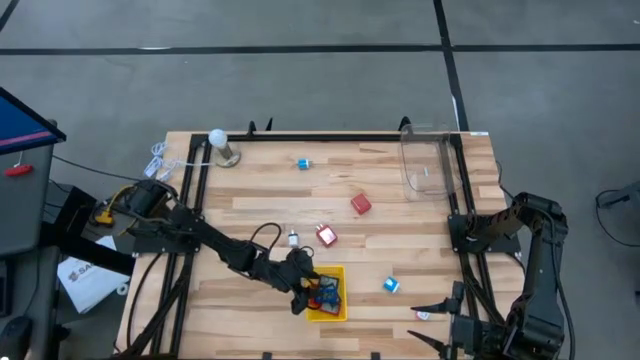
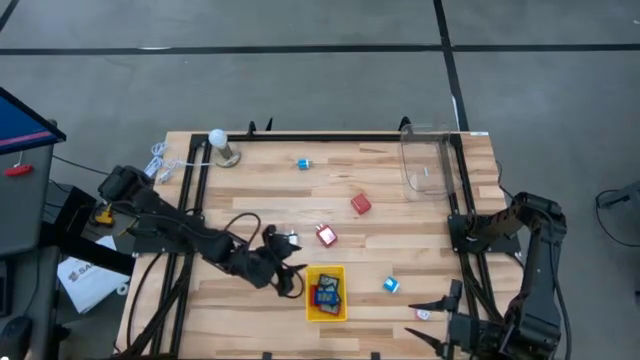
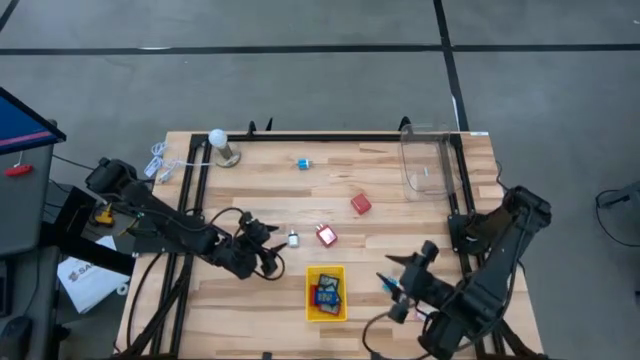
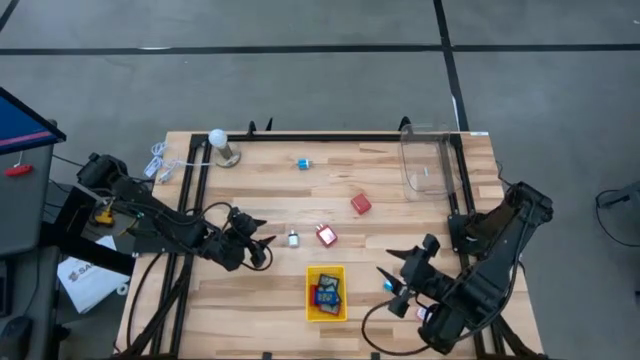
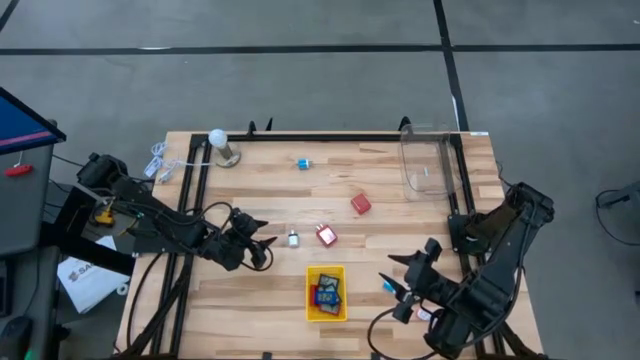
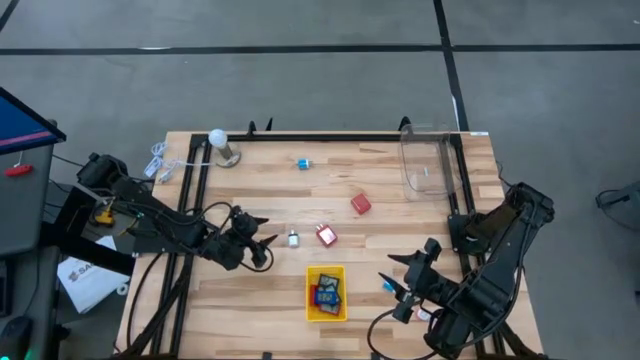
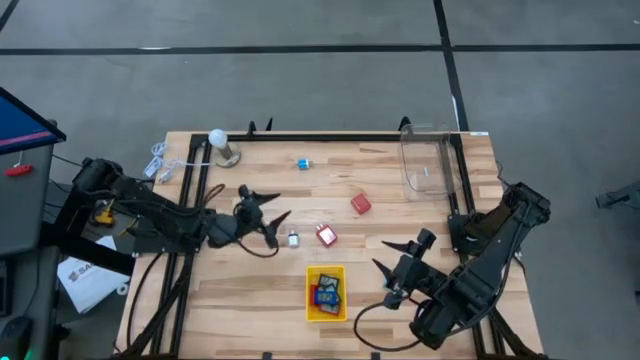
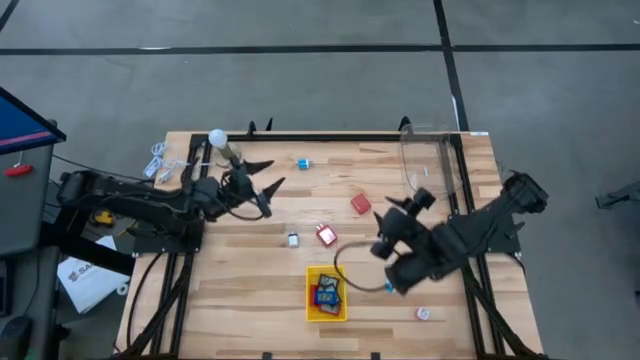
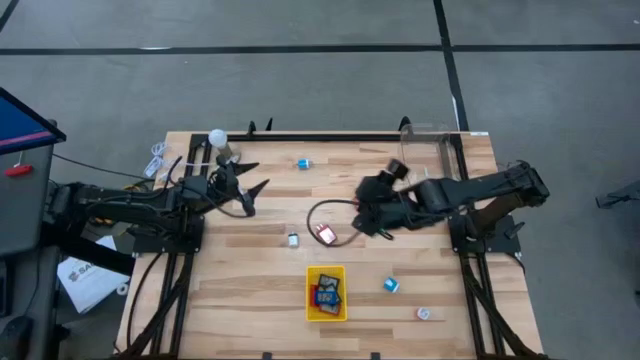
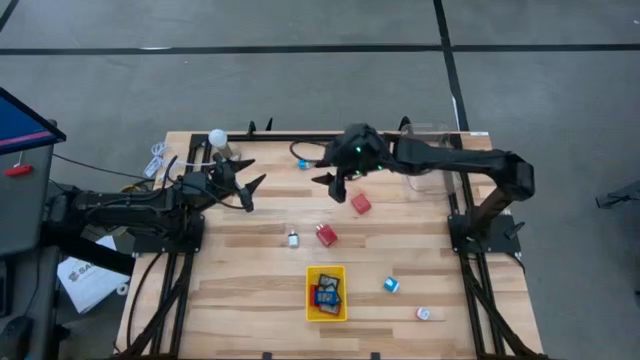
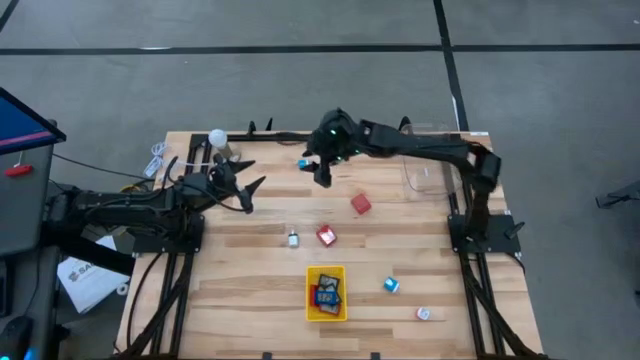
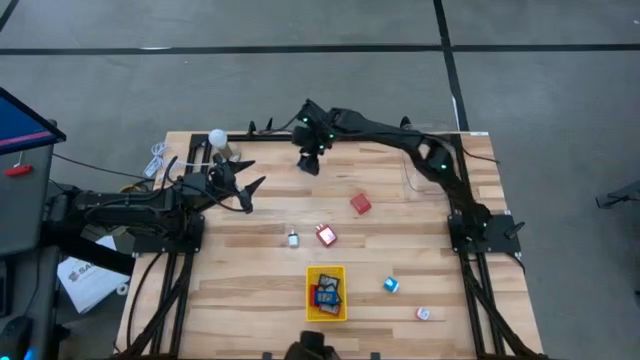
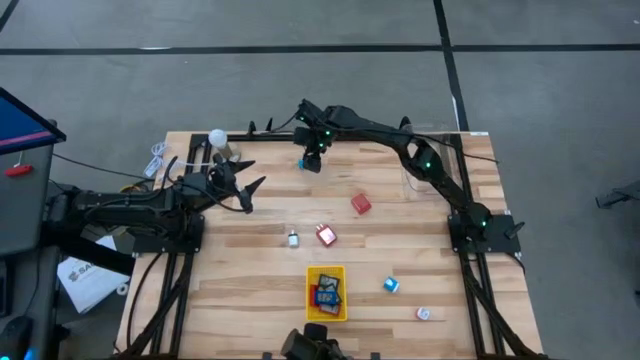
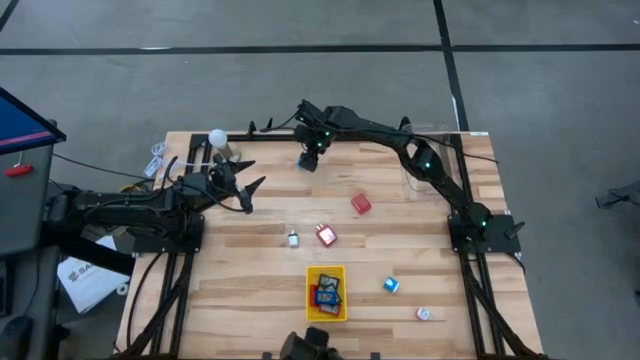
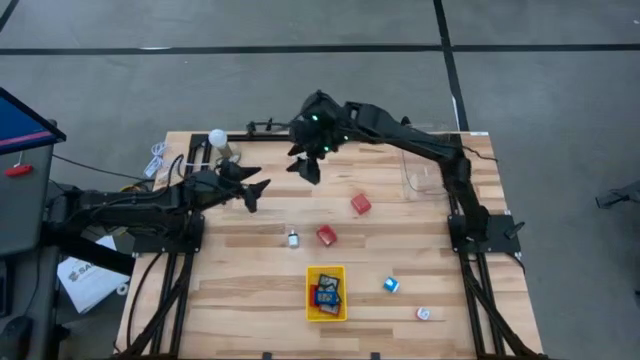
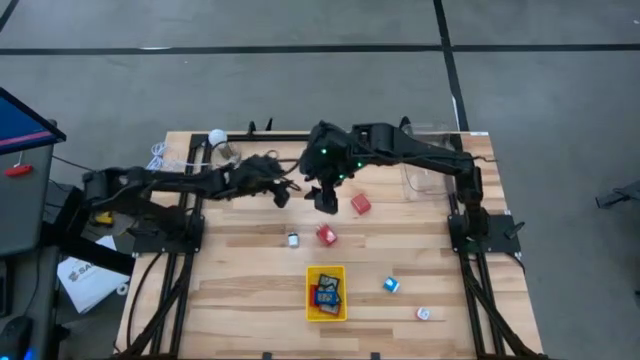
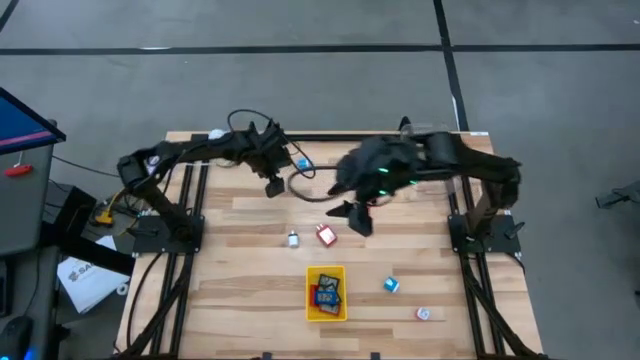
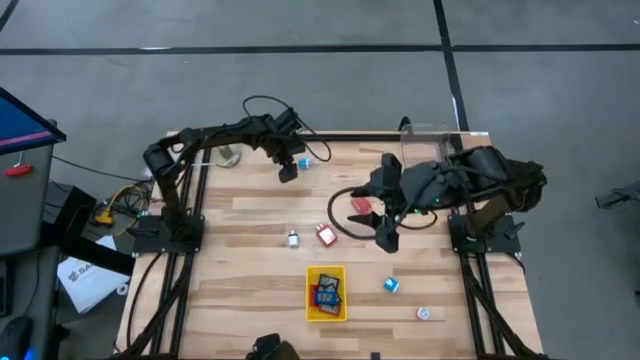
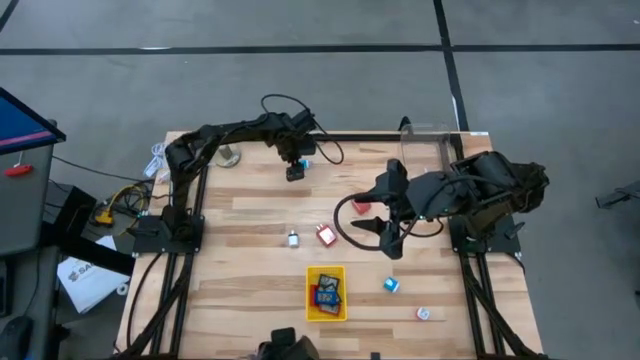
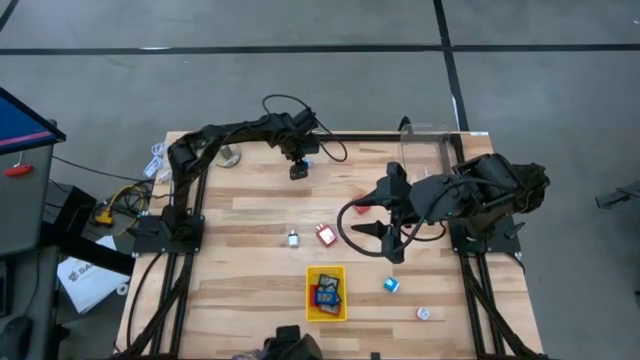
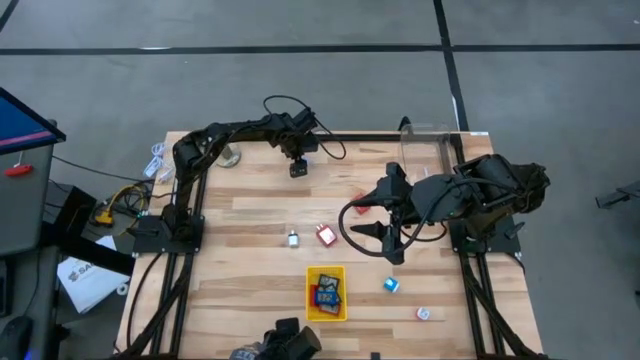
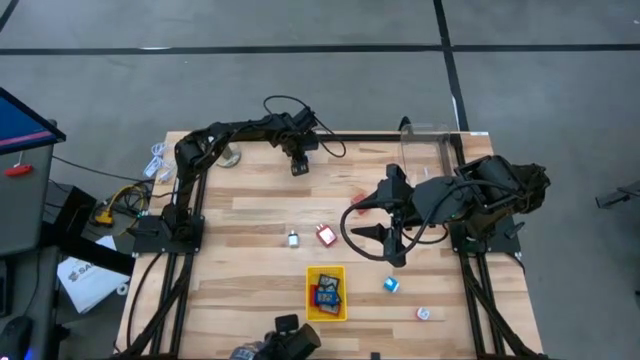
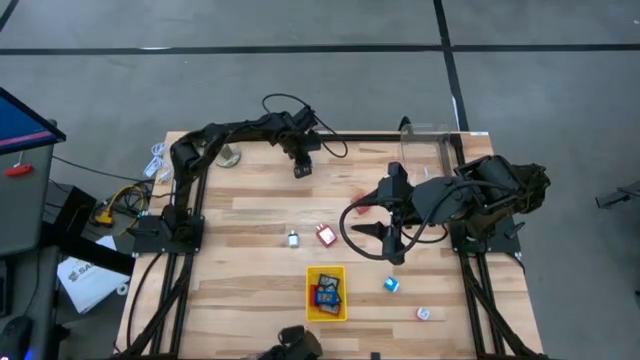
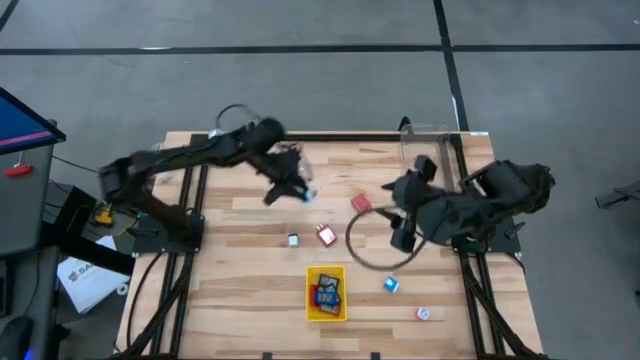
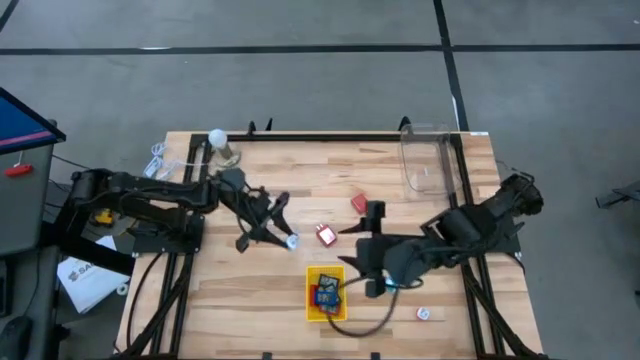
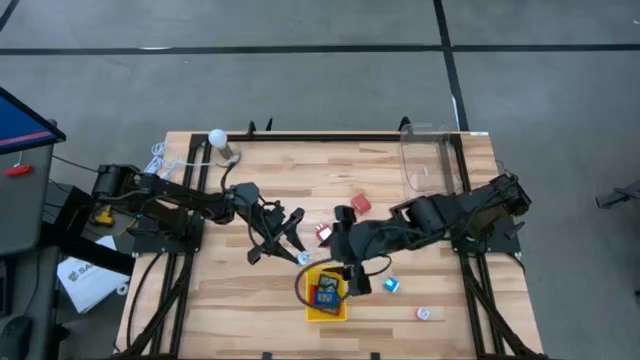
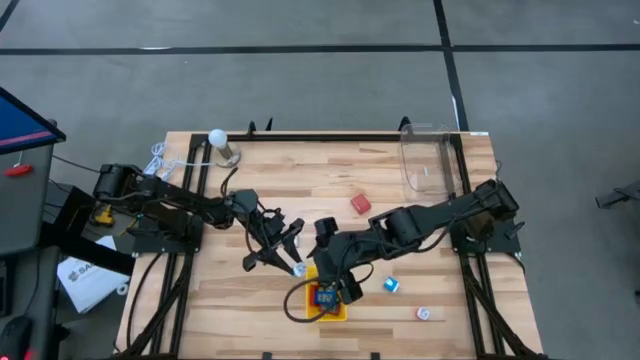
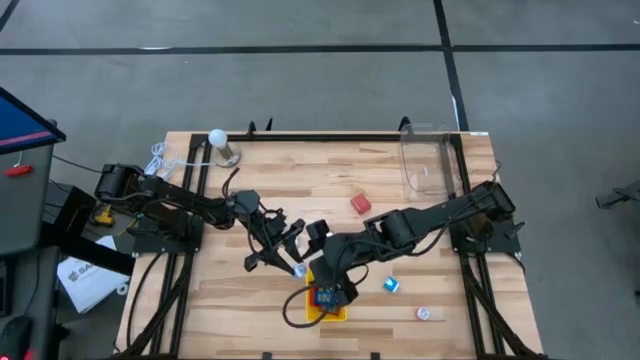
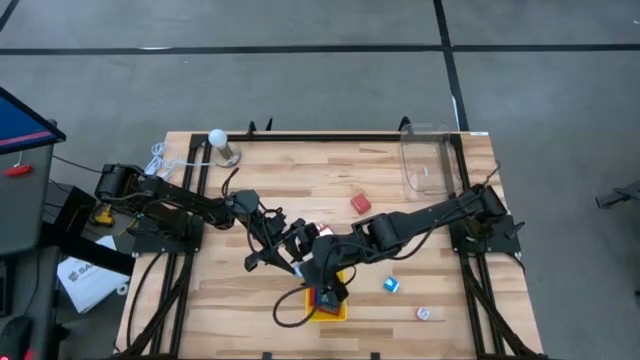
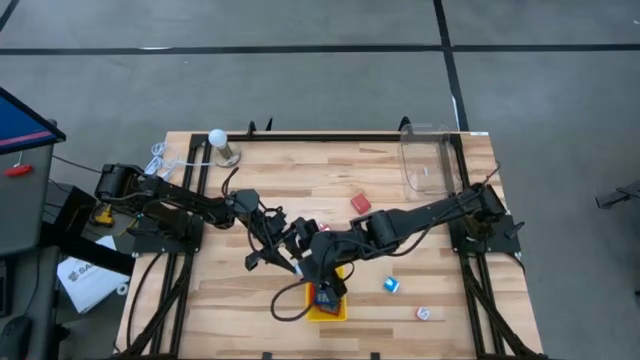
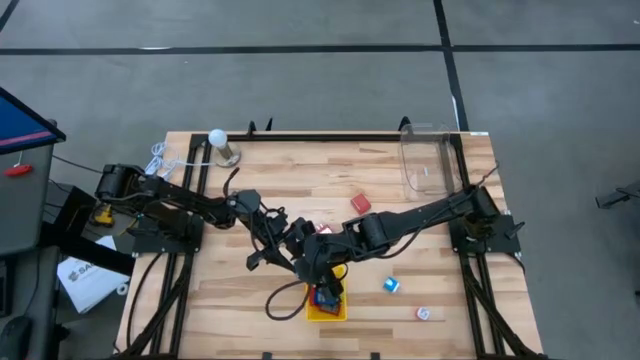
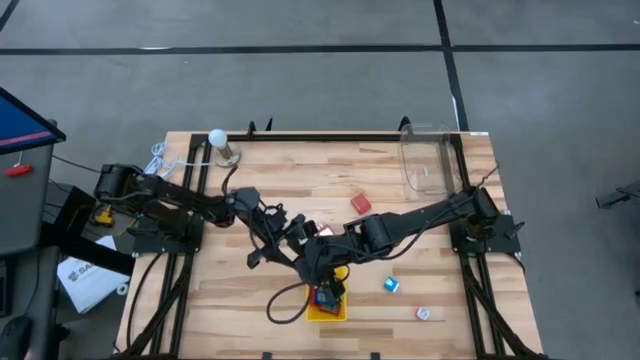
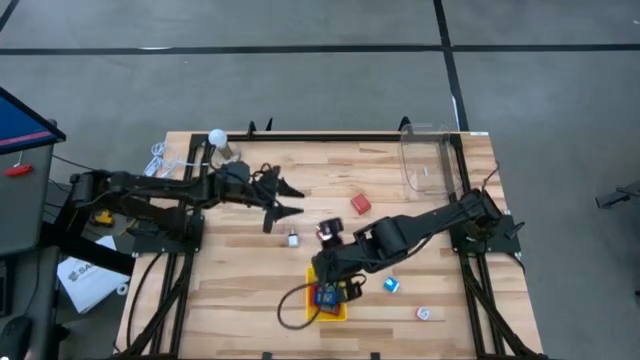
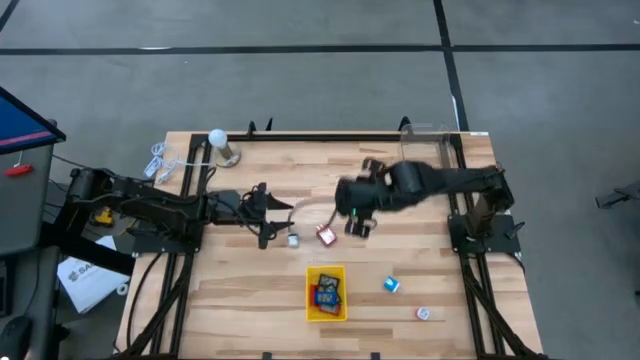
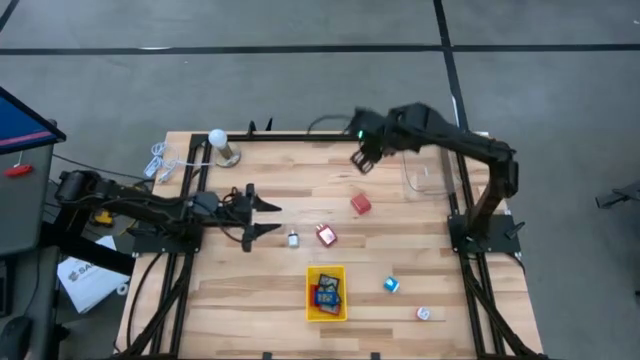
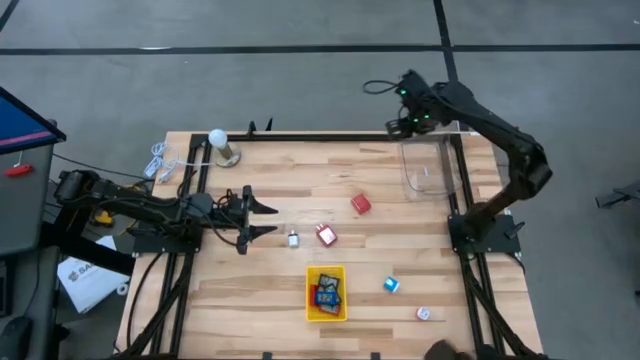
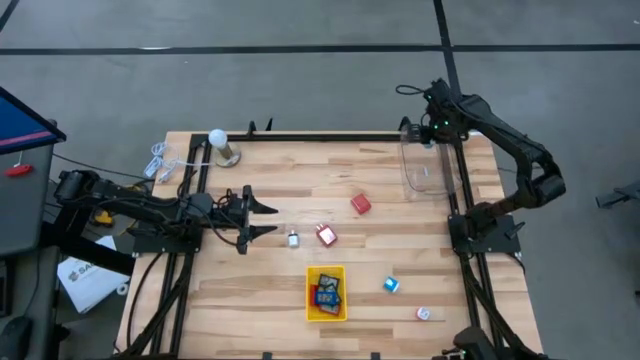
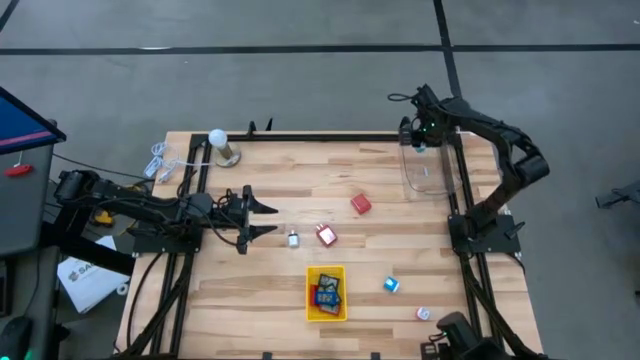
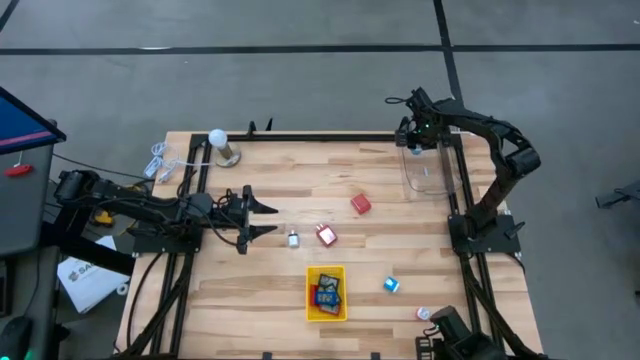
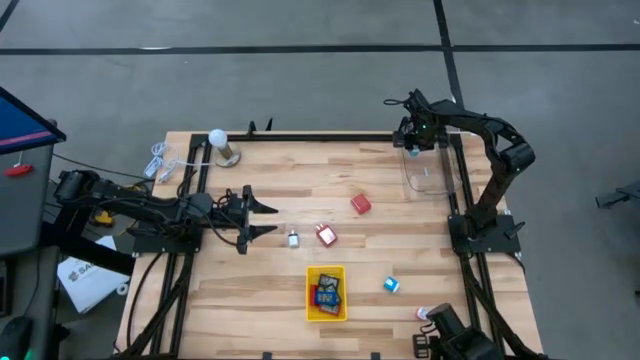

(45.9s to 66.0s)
Task: Pick & Place Office items
Put the left blue charger adapter into the transparent bin
